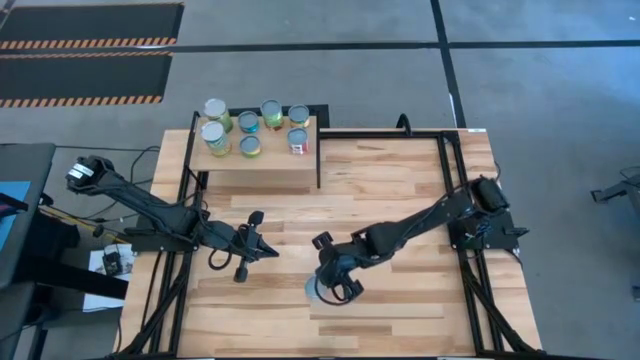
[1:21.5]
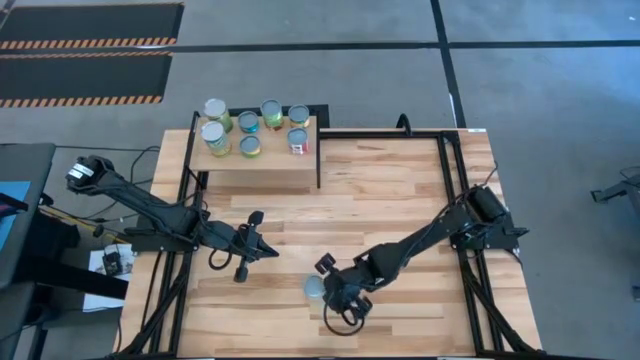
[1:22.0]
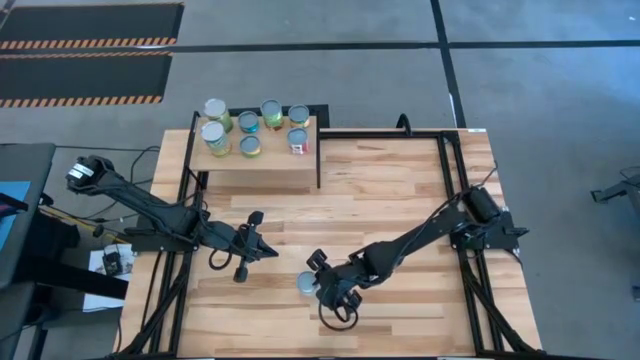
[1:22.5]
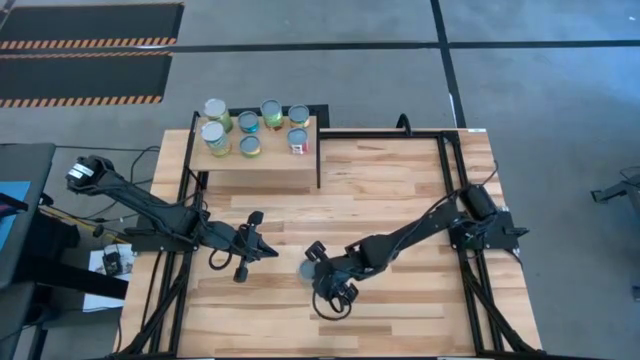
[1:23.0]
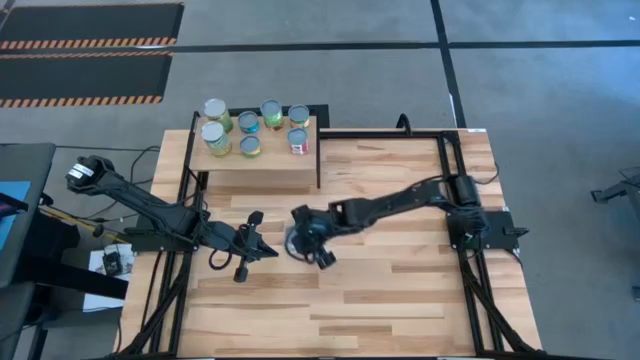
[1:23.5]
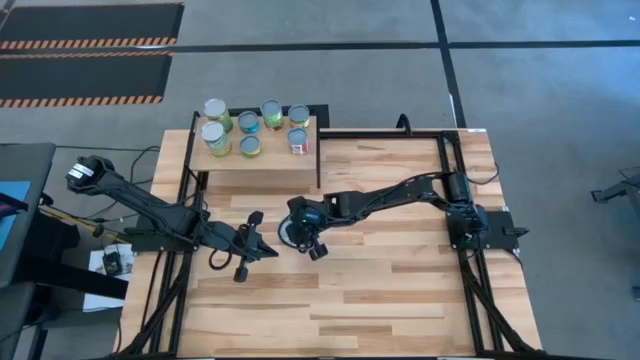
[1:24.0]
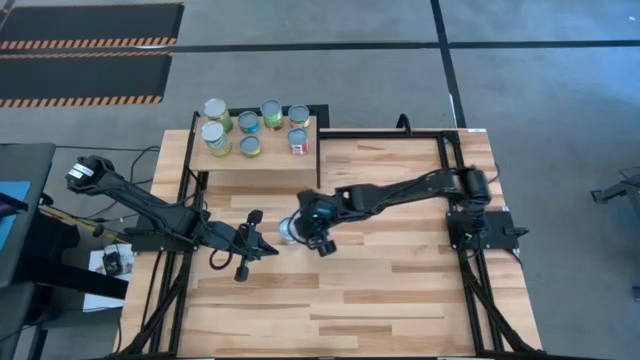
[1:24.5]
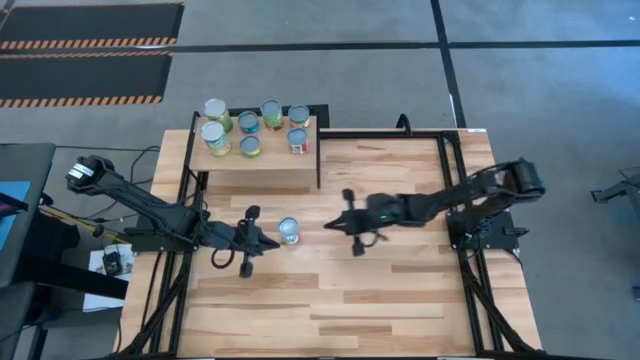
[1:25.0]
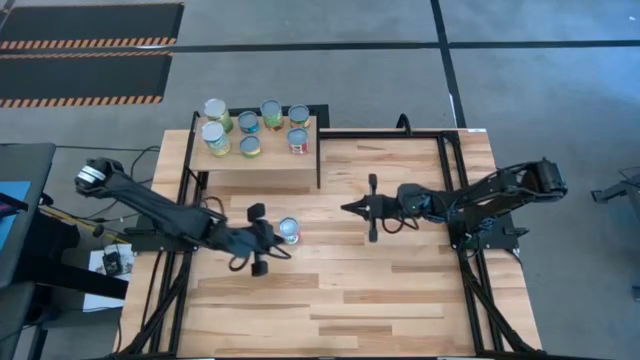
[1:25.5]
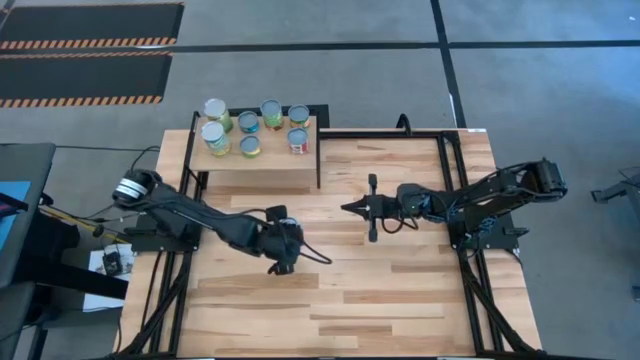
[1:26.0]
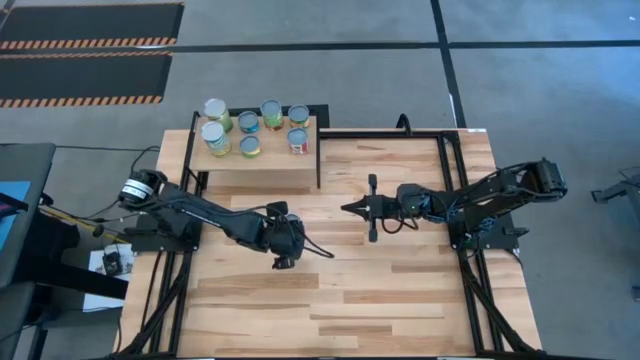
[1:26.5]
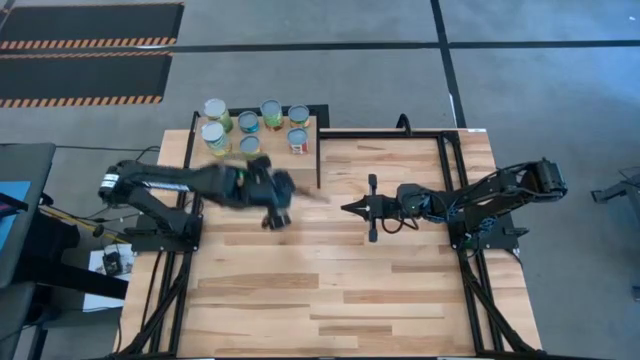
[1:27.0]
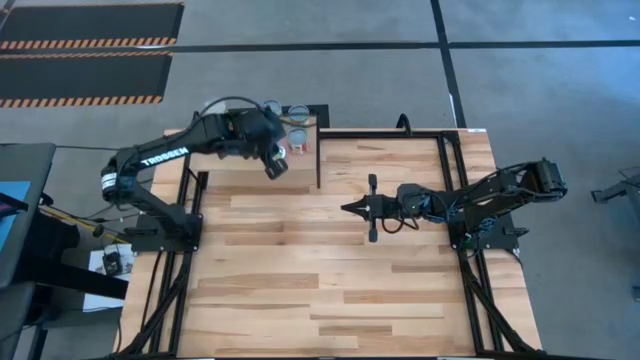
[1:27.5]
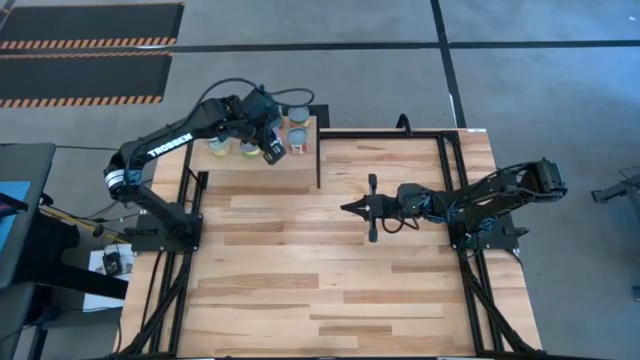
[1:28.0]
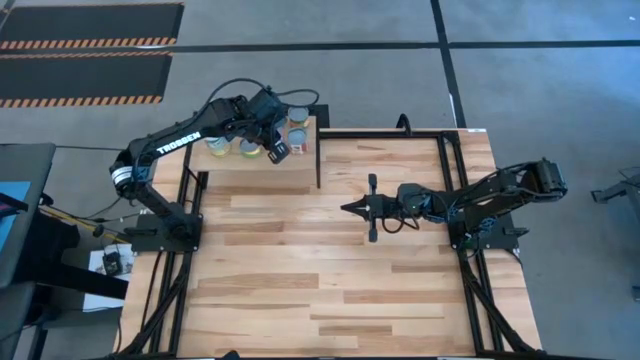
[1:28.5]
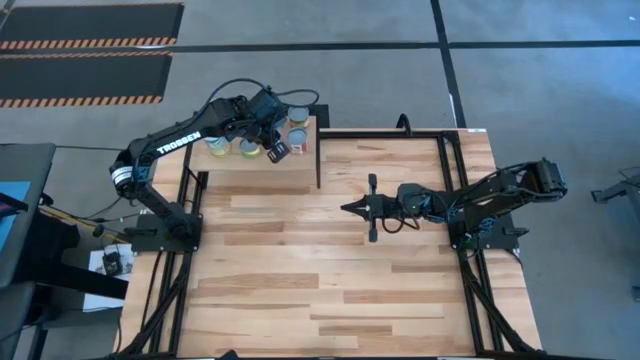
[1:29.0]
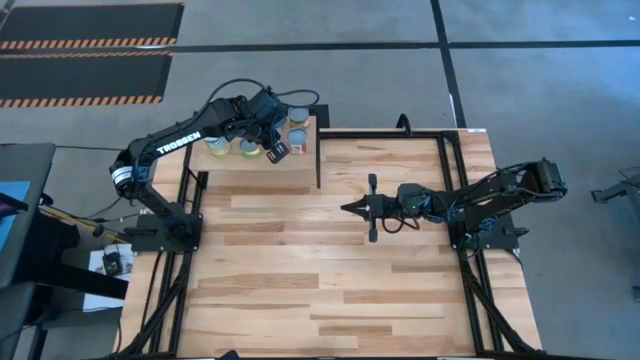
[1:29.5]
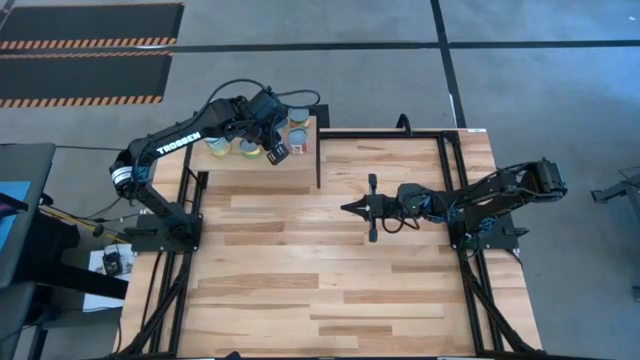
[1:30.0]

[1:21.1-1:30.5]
Task: Pick and place cans onto a shelf
Put the canned mixed fruit on the shelf

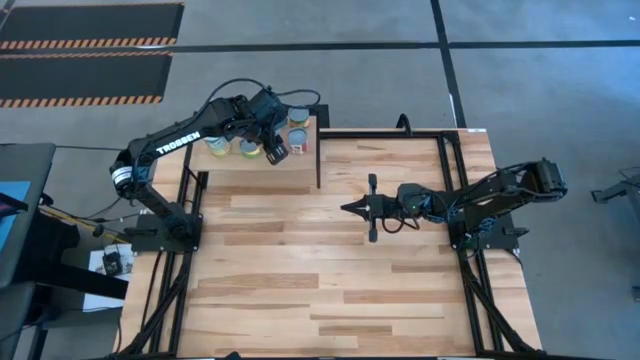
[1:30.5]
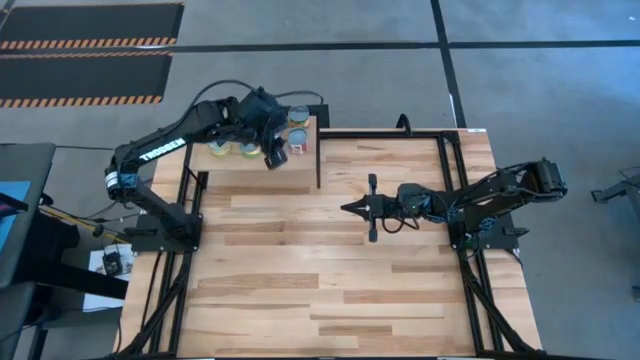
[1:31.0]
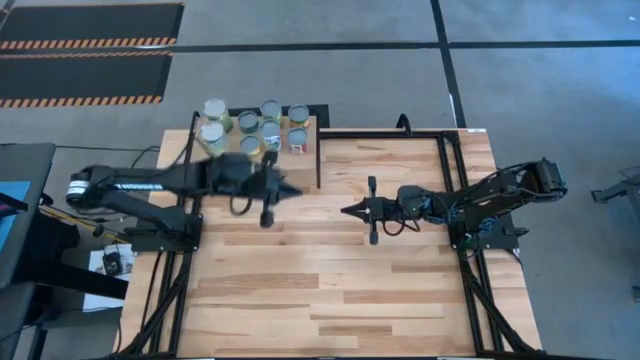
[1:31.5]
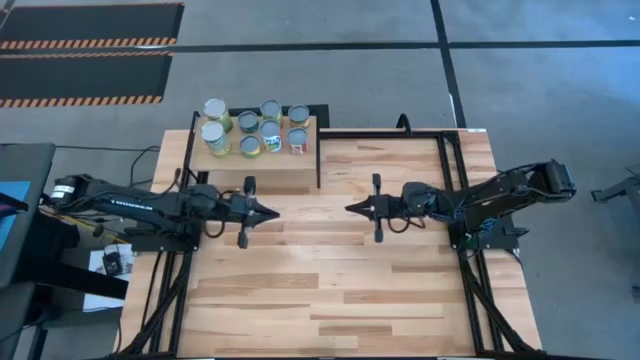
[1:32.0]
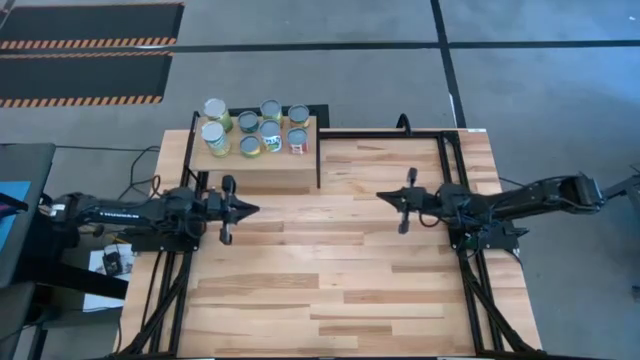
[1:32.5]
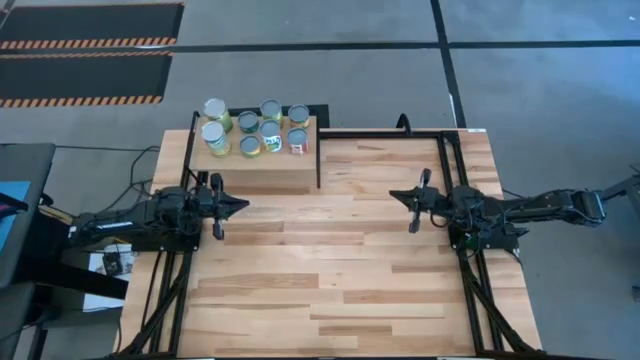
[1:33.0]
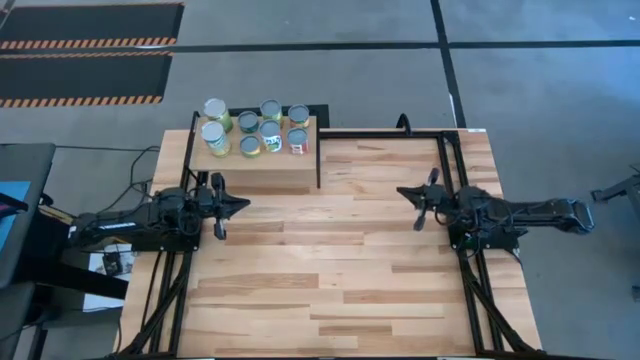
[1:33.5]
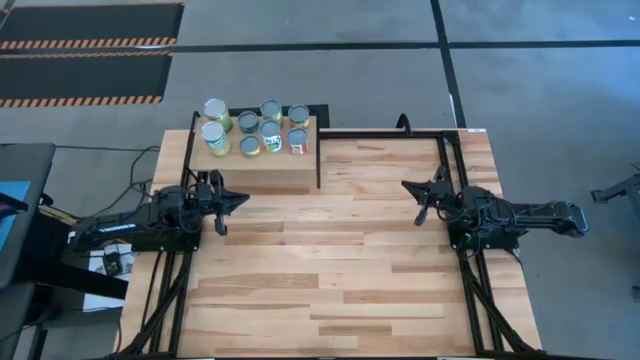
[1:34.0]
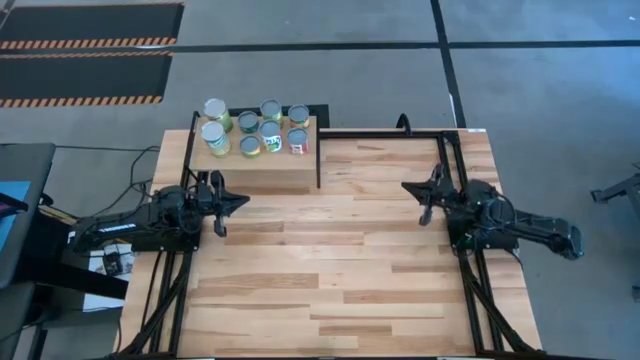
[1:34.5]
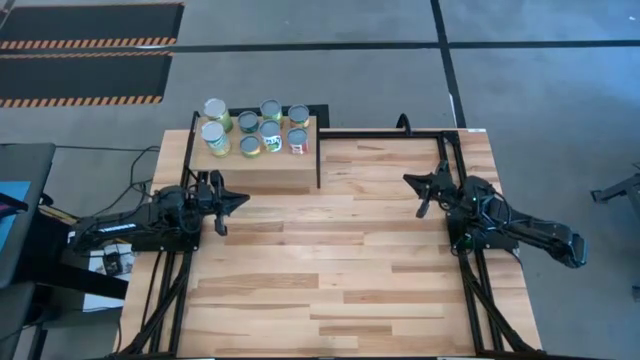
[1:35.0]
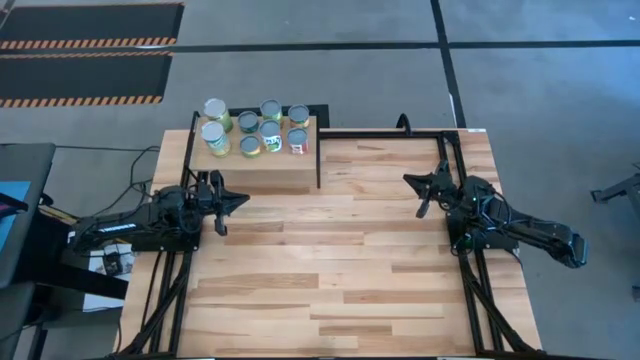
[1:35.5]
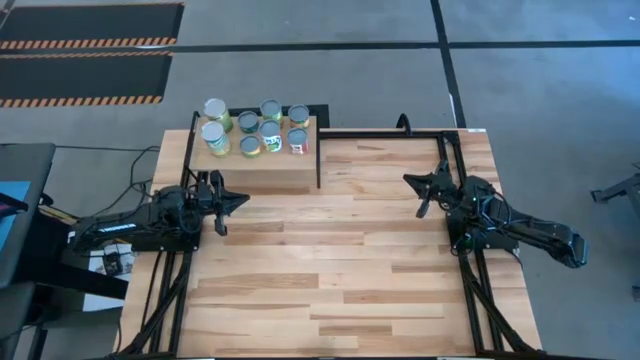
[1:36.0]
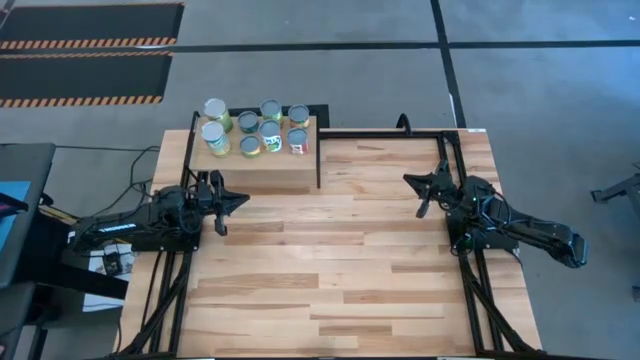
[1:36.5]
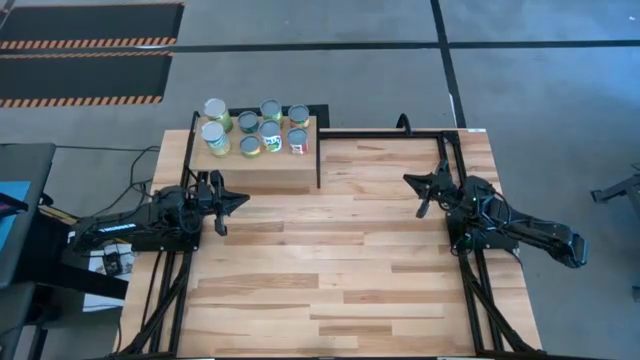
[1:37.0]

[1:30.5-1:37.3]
Return to Home Position

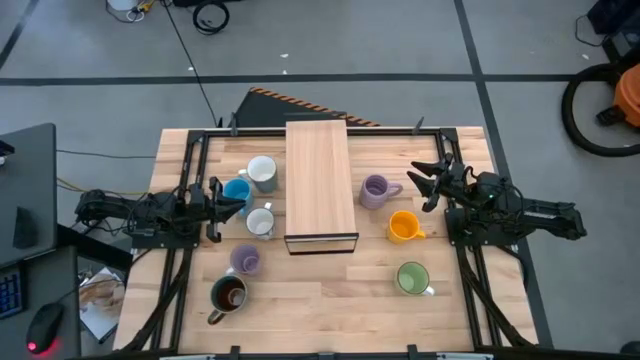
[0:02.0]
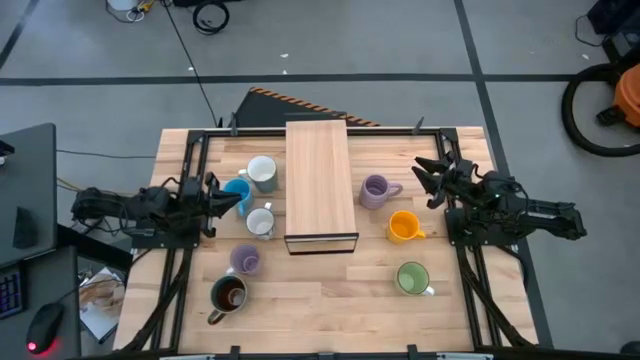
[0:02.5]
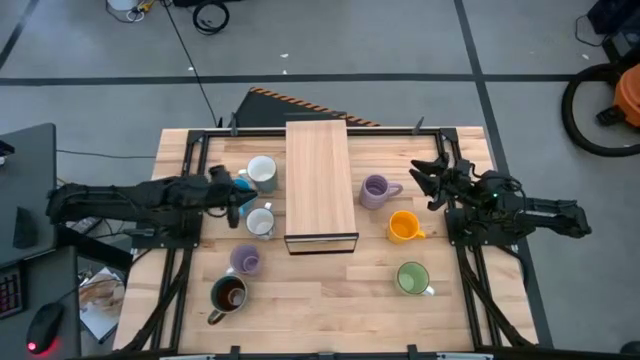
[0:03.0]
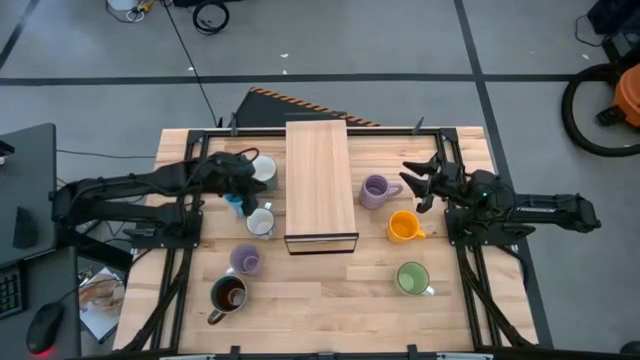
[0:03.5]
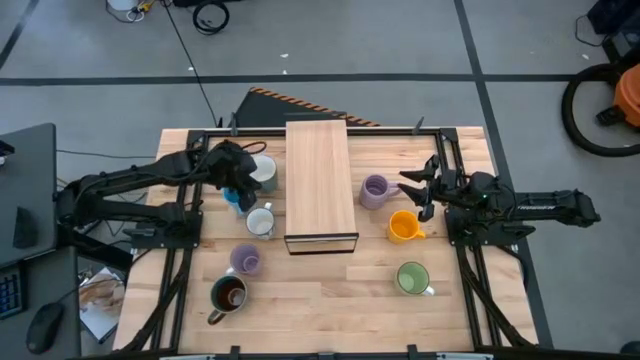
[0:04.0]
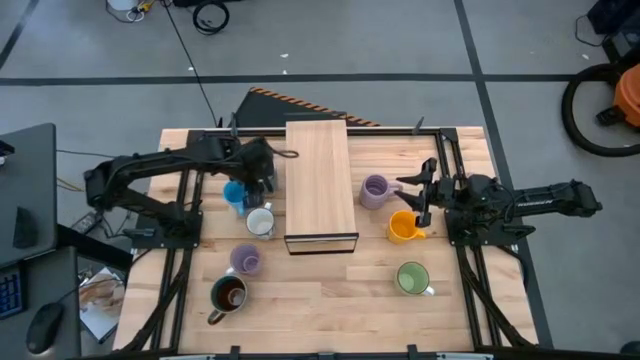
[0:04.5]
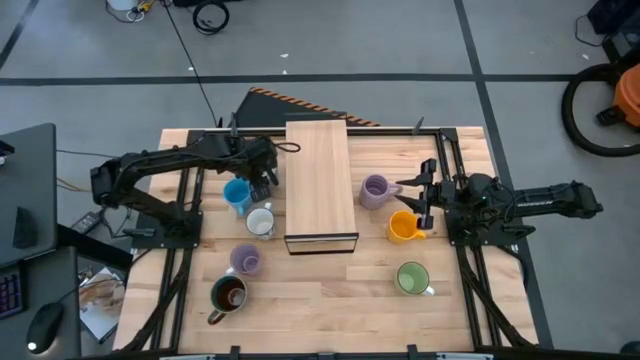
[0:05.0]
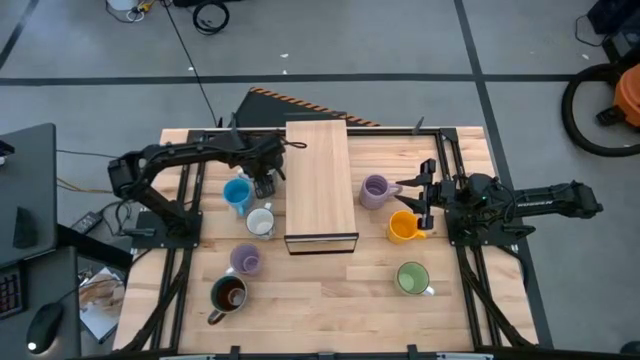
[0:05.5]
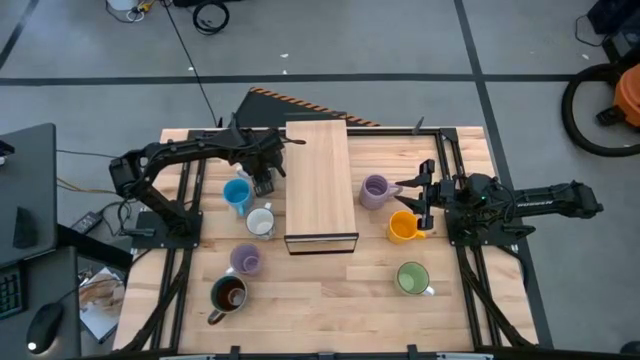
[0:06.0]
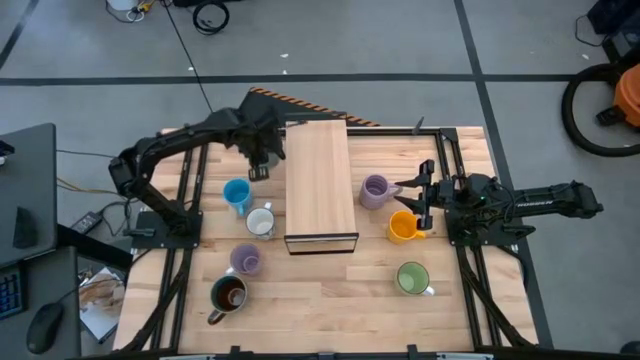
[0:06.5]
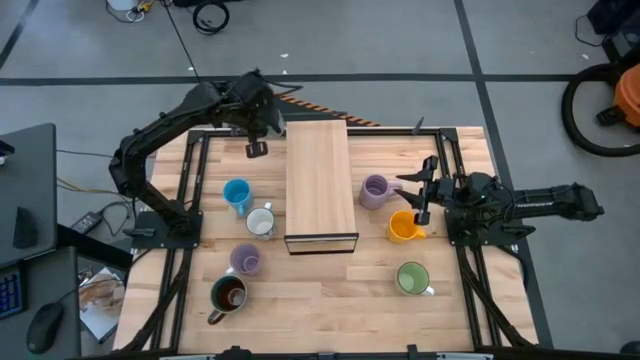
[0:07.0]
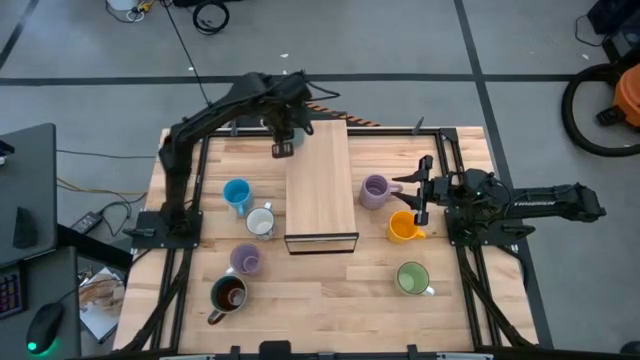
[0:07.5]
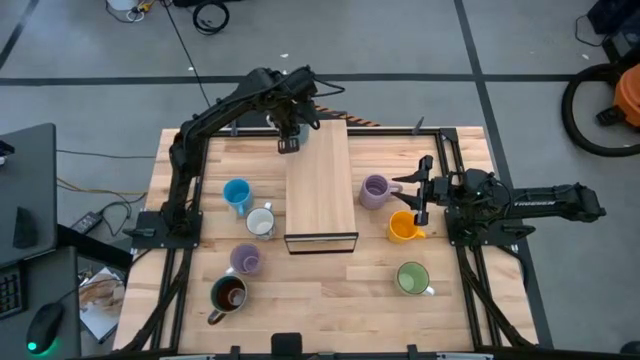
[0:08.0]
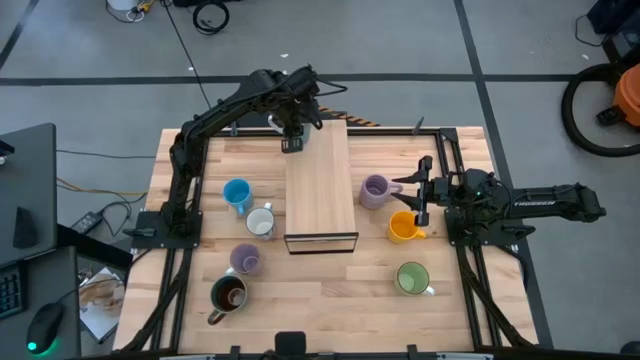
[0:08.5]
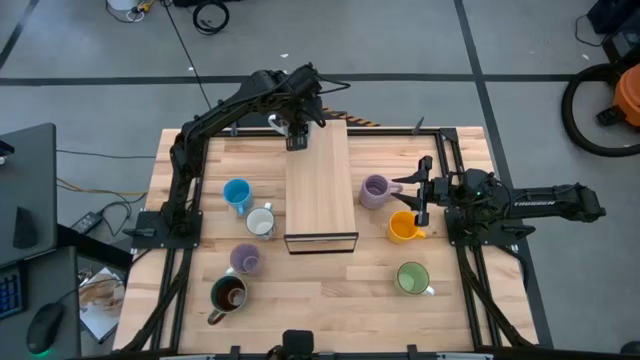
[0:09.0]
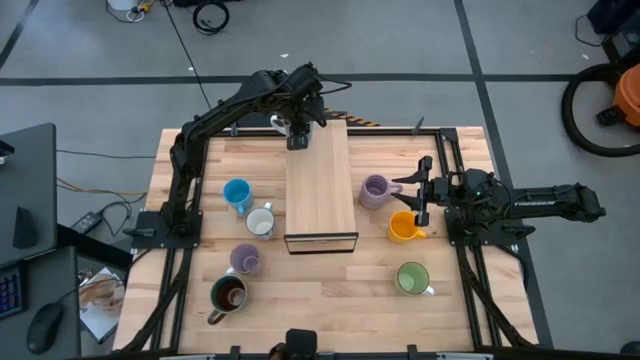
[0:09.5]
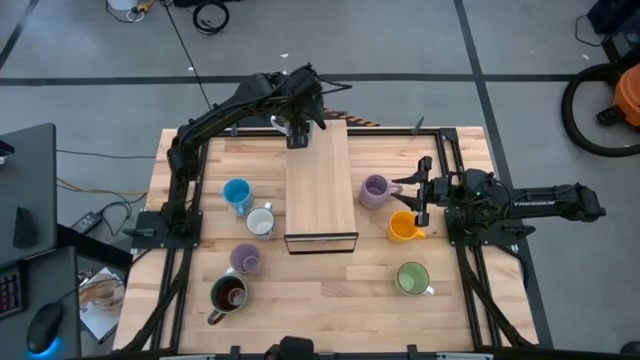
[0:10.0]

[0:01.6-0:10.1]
Task: Place coffee mugs
Put the blue mug on the shelf
